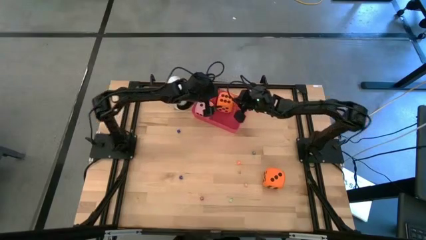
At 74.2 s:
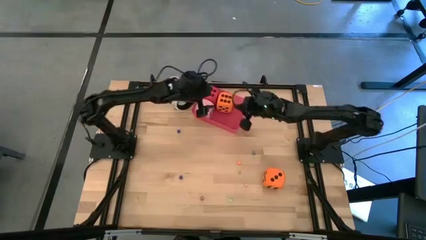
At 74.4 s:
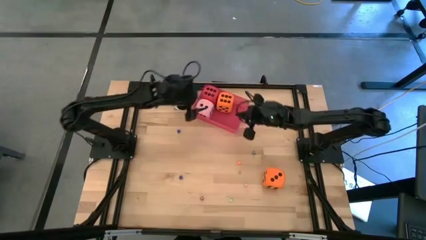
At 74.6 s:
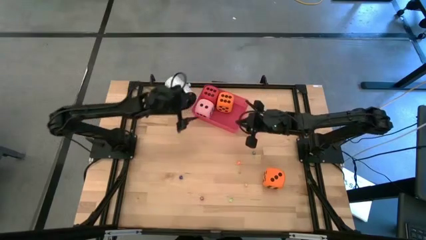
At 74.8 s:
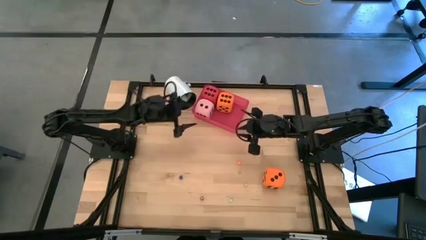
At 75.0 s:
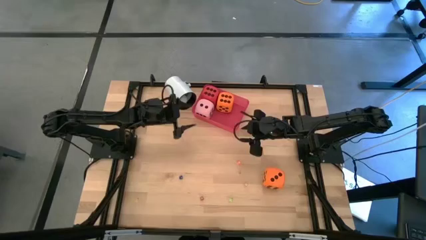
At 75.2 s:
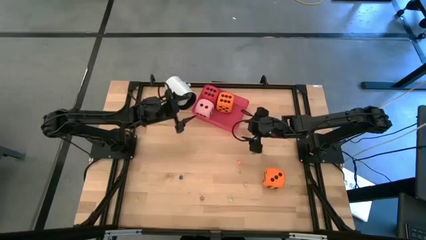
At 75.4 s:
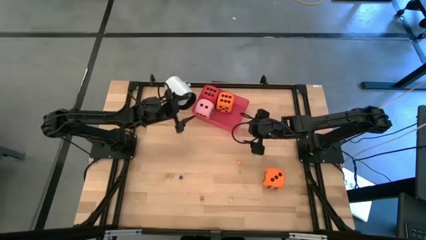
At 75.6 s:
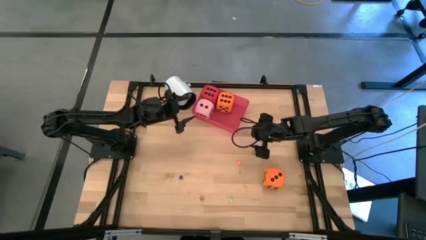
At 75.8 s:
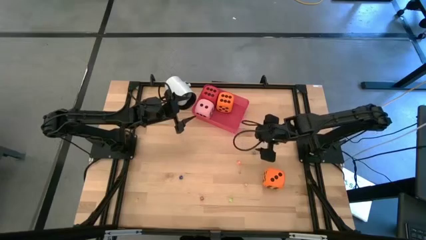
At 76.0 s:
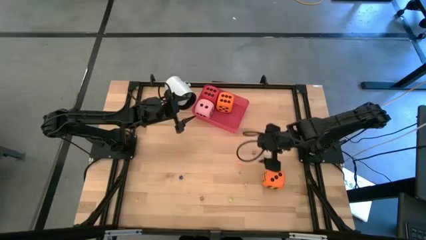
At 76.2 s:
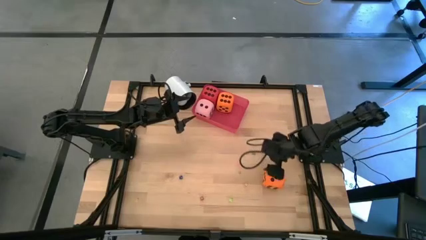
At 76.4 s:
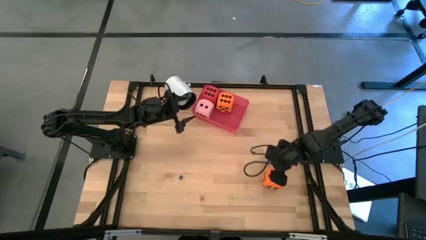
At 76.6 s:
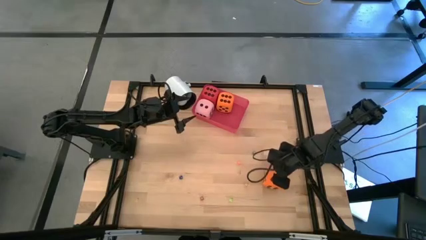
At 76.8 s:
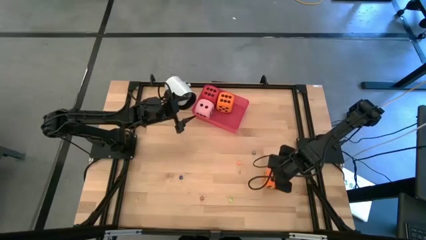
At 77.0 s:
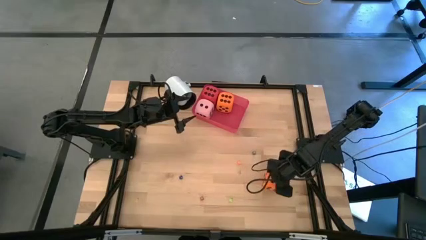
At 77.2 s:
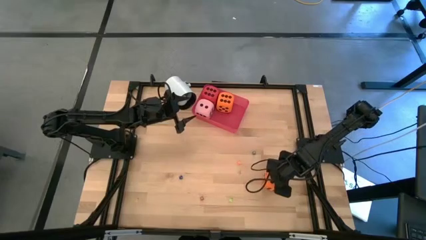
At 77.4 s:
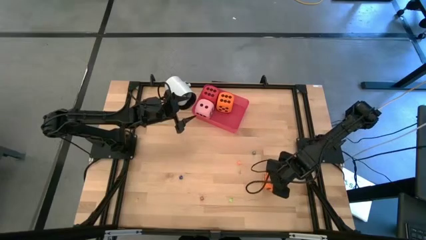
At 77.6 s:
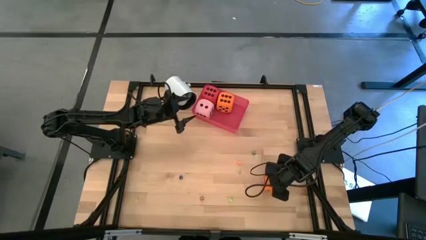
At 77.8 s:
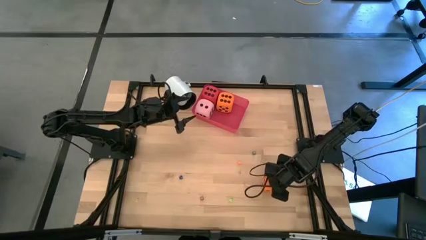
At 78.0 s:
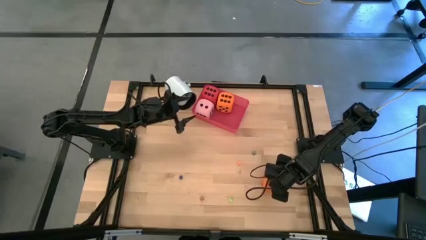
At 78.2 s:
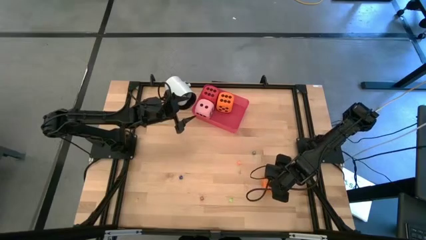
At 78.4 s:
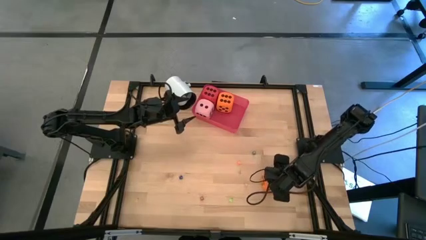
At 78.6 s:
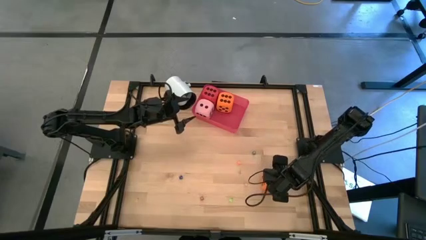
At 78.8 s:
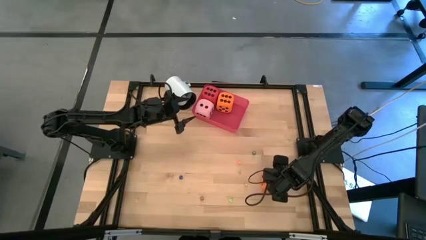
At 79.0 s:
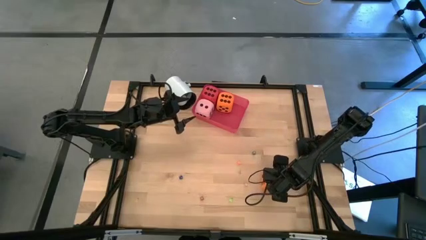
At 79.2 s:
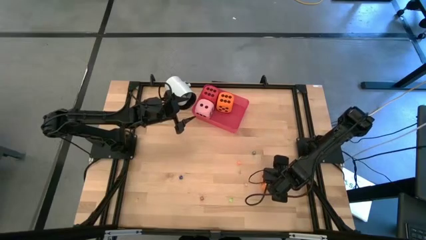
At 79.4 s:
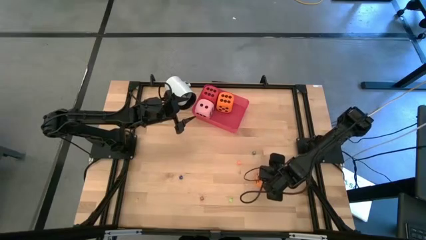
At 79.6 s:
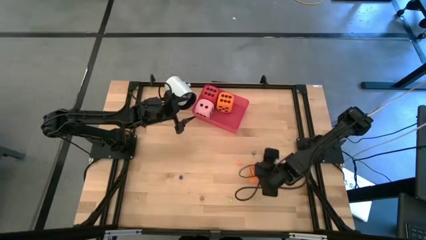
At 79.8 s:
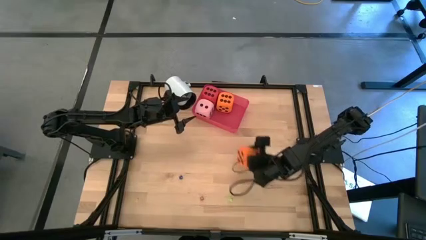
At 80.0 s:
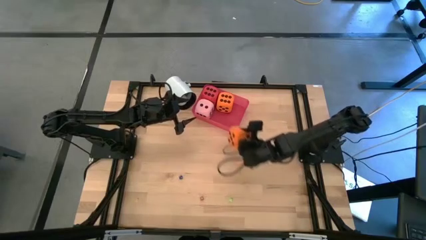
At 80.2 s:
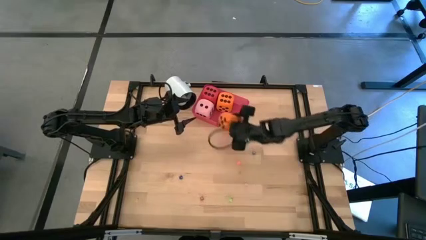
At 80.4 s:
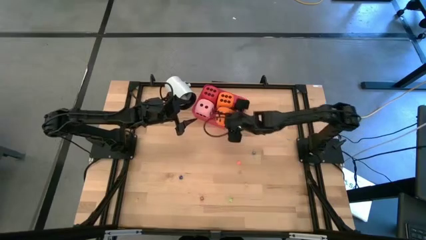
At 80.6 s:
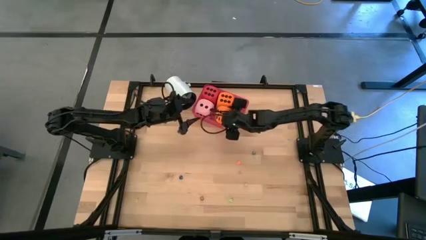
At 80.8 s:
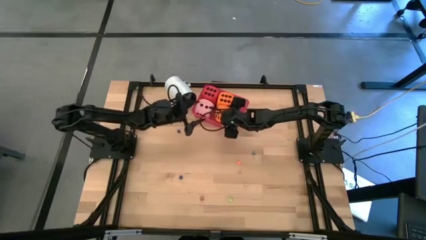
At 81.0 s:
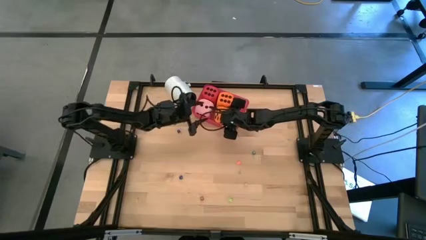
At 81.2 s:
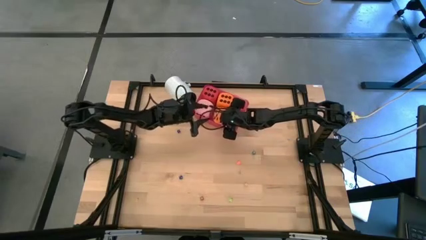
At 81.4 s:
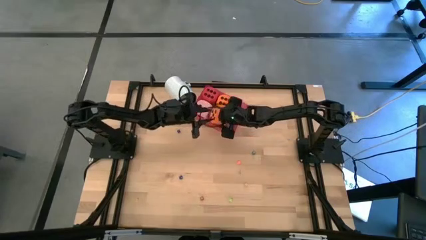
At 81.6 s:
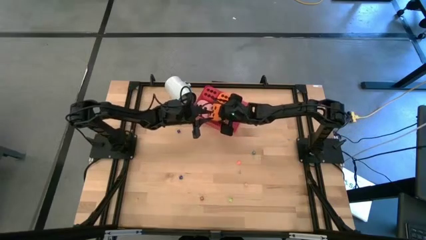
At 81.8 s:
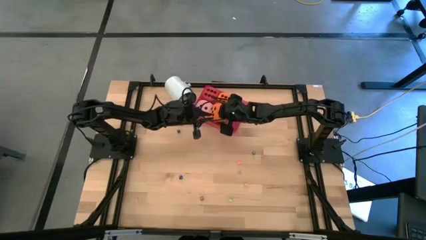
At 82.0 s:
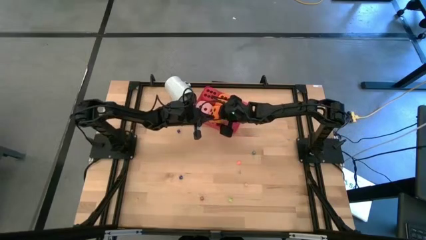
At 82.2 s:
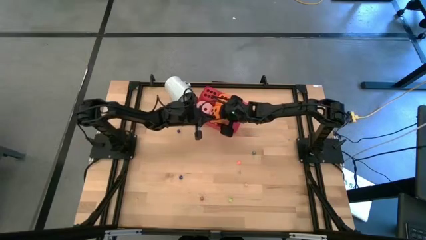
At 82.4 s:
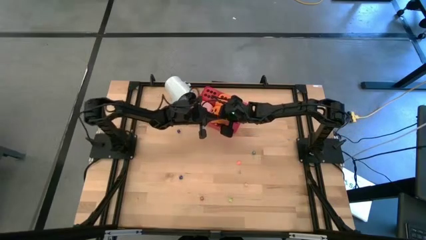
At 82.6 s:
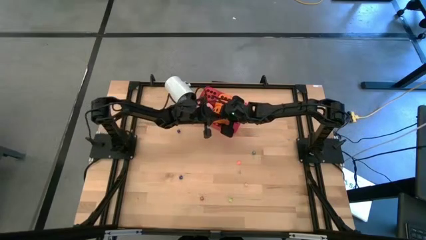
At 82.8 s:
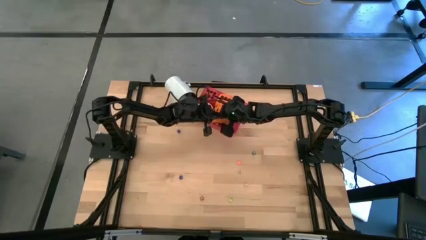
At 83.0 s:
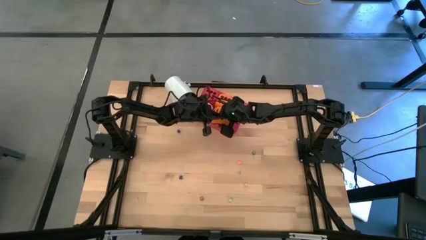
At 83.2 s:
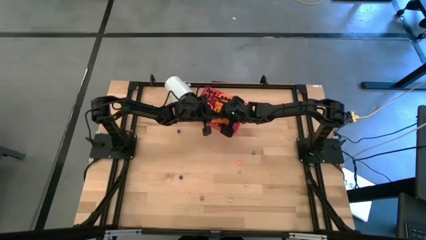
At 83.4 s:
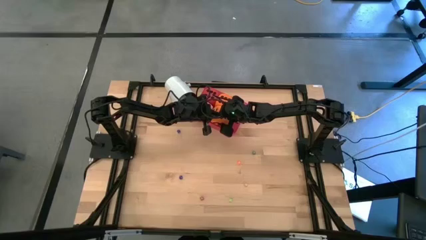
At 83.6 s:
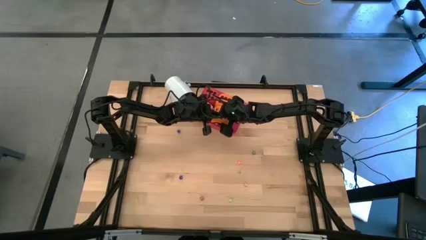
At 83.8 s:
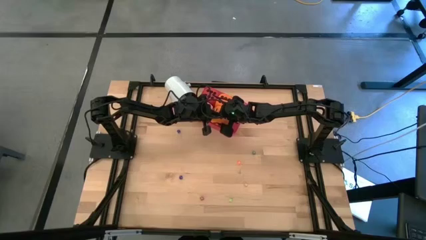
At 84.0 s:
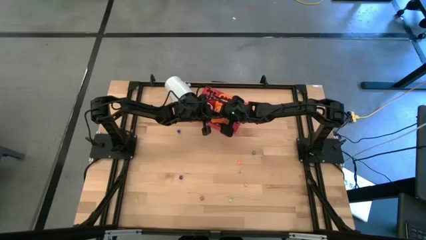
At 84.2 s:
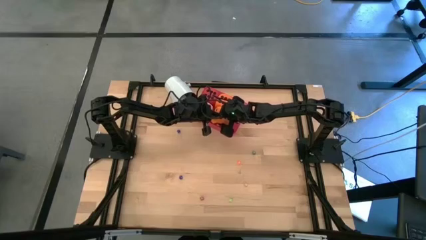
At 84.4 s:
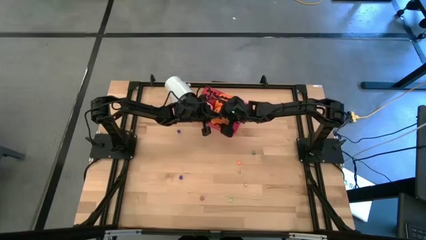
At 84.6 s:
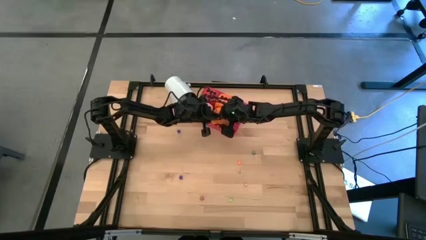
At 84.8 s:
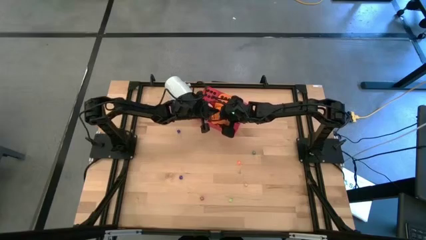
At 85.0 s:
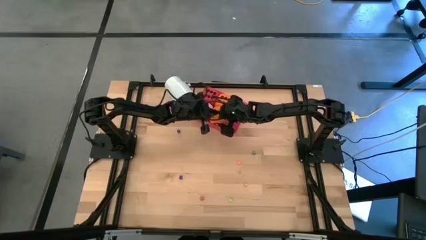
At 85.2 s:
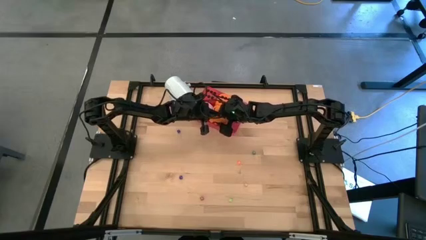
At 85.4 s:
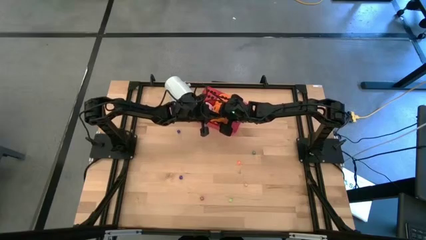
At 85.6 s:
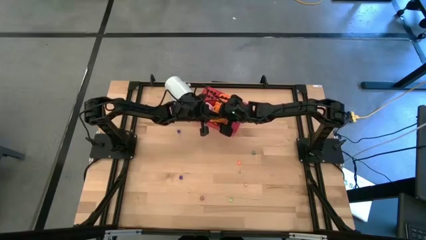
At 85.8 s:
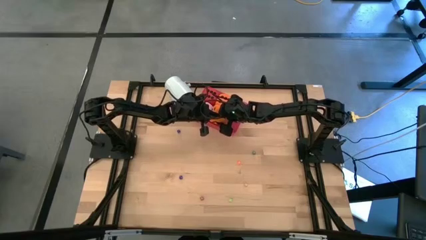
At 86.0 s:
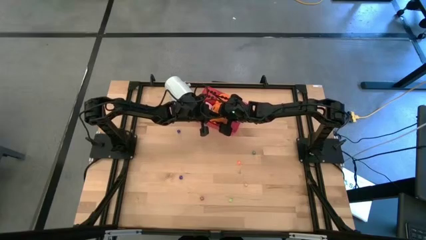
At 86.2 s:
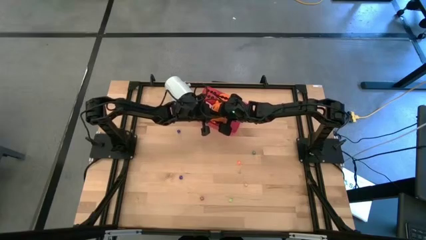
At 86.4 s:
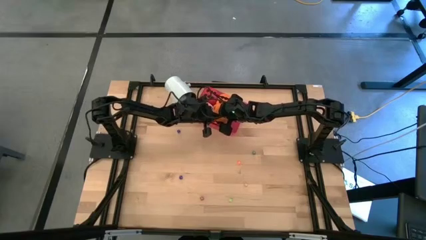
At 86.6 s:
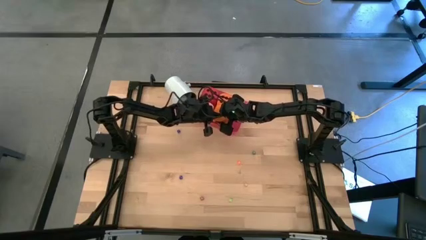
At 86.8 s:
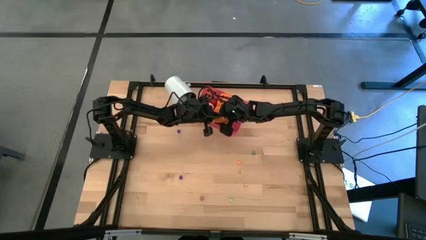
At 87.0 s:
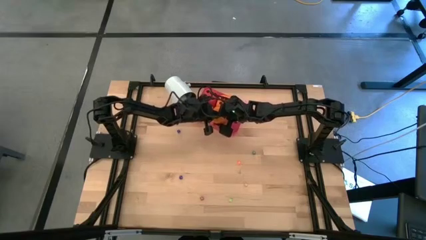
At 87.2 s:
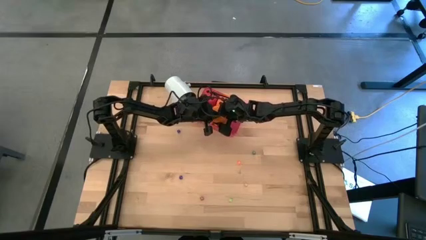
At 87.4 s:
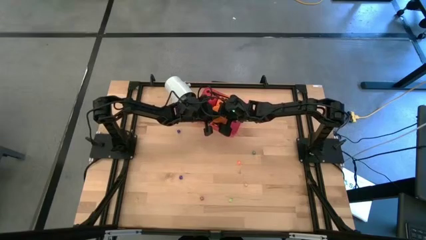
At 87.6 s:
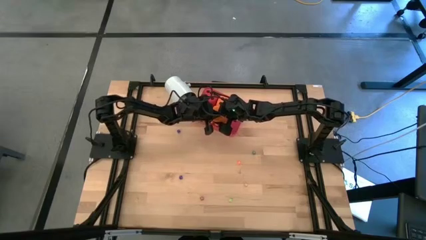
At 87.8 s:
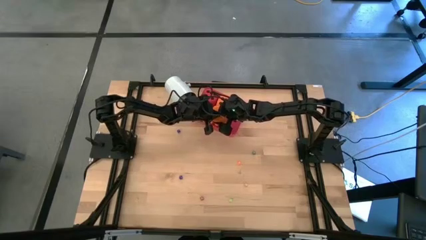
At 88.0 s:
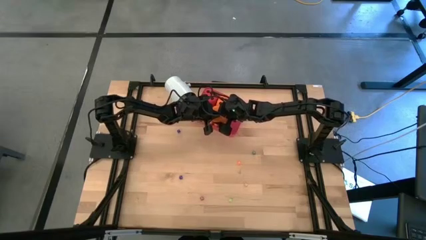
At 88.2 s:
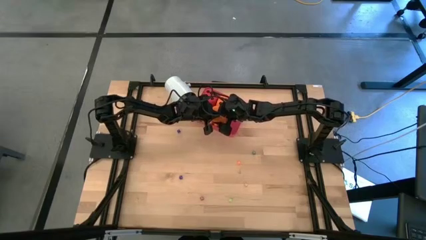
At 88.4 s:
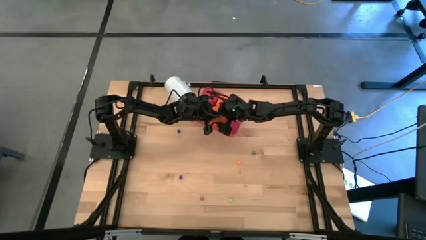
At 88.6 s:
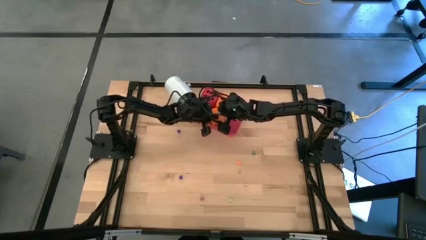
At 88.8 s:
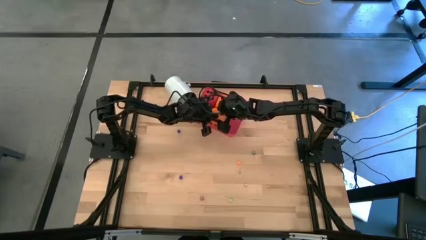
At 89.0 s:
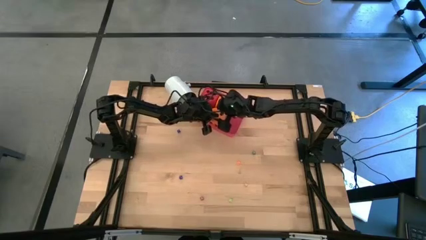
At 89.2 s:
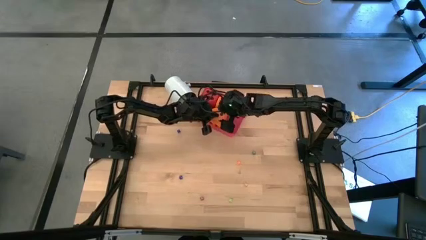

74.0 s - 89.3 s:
Task: Pick & Place Dice
Put the big orange die into the red bin

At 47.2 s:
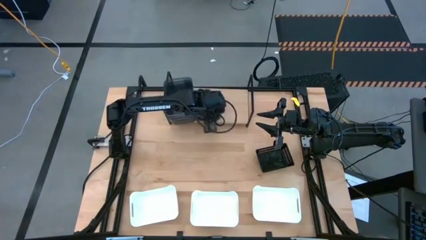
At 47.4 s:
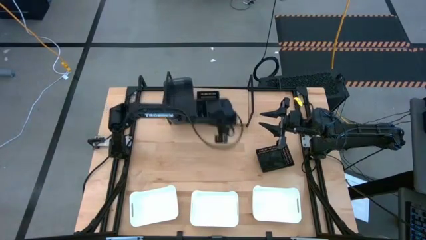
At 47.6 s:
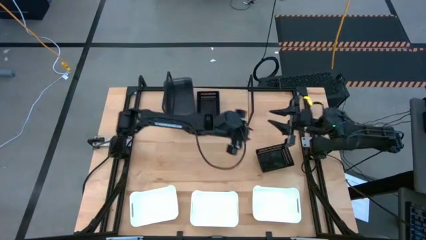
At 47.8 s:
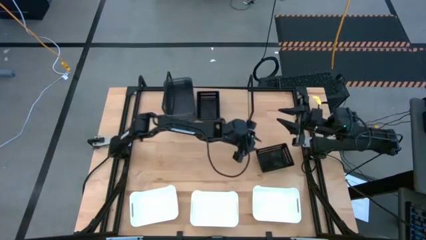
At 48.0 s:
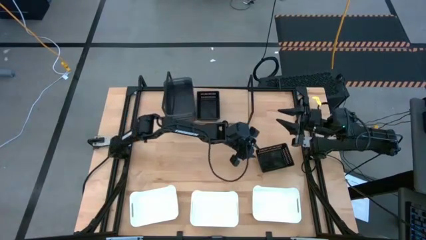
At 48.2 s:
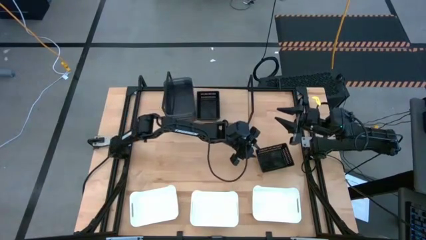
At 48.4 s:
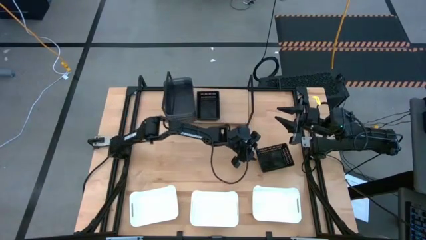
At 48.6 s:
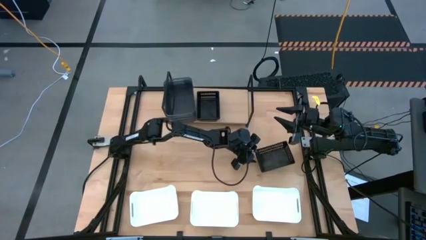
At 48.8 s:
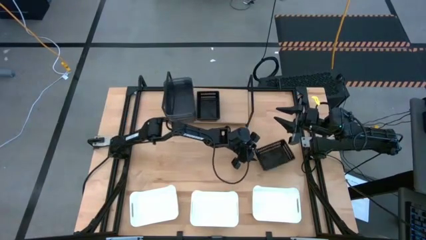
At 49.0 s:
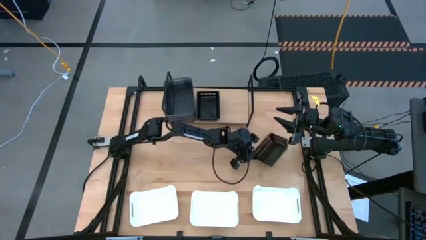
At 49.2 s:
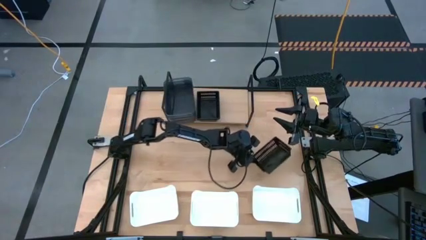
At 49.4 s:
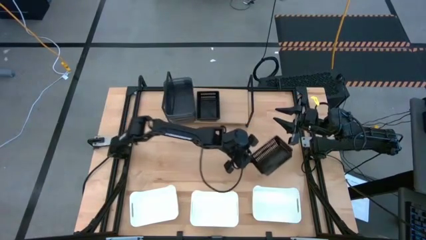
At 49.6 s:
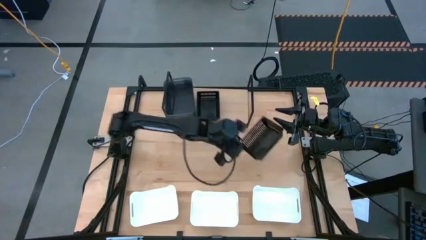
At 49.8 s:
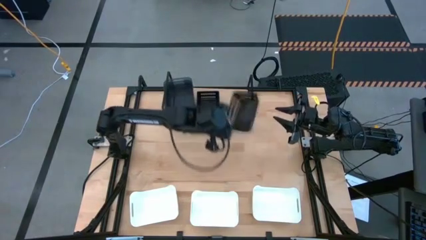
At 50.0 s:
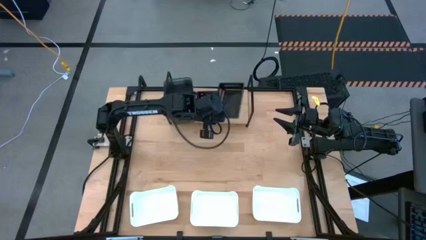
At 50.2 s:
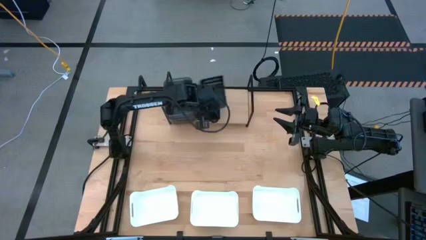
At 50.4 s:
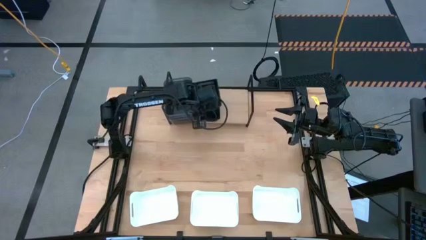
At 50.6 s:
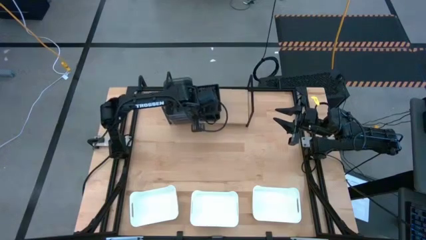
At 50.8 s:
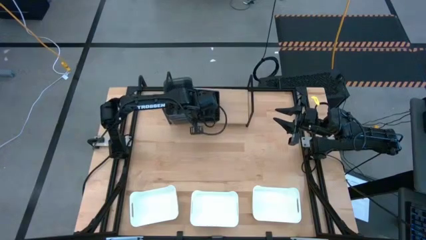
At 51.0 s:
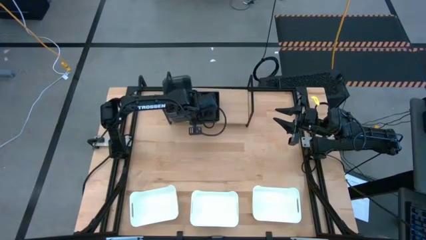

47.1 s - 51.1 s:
Task: Stack baskets on shelf by color
Stack the black bin on top of the black bin
